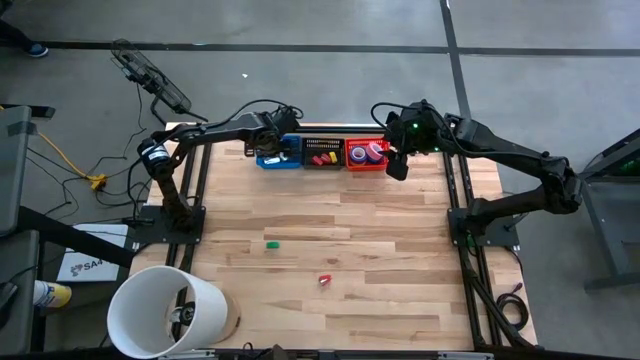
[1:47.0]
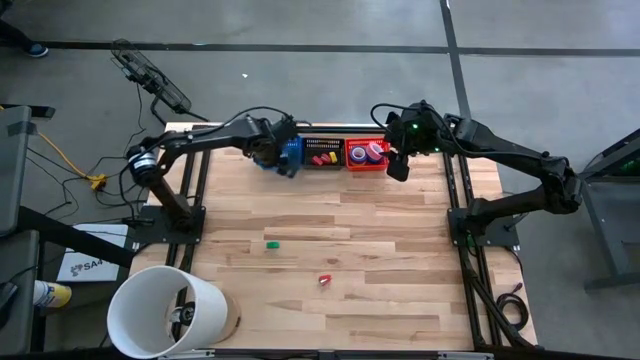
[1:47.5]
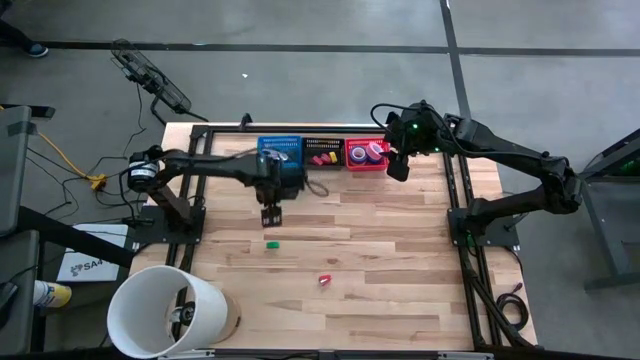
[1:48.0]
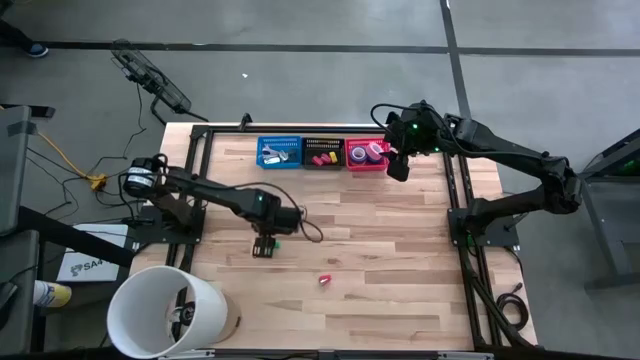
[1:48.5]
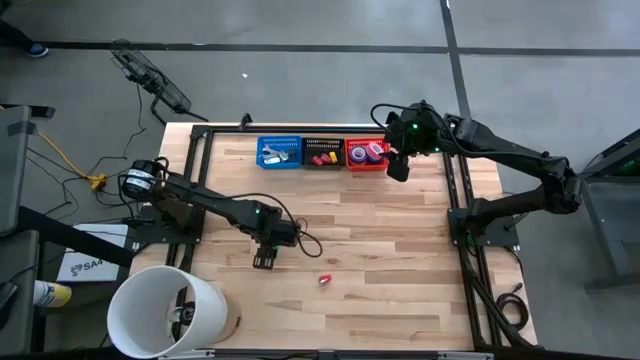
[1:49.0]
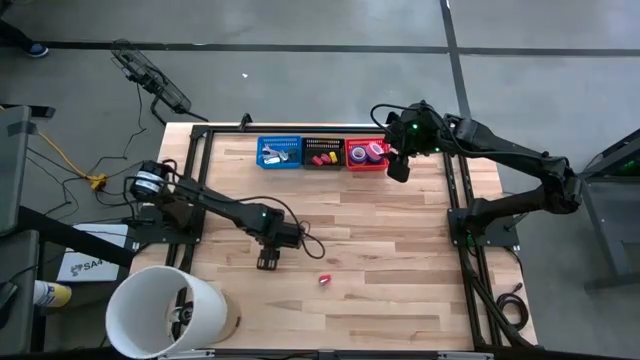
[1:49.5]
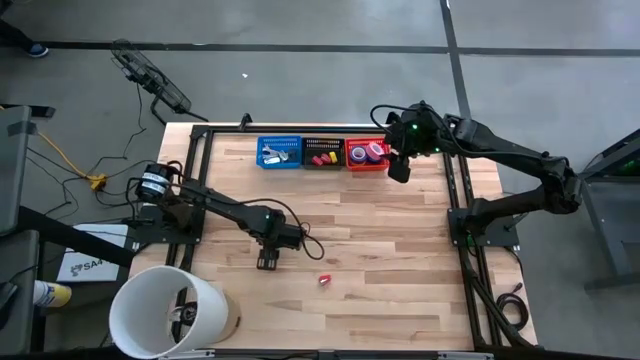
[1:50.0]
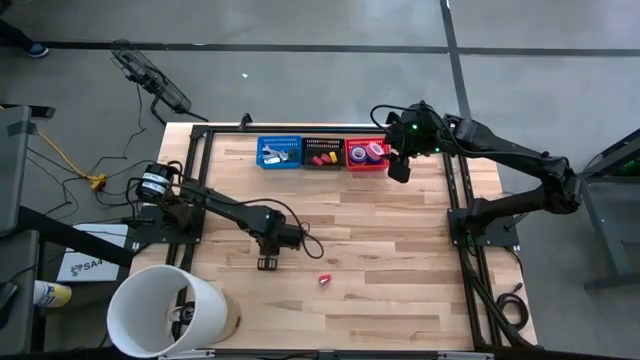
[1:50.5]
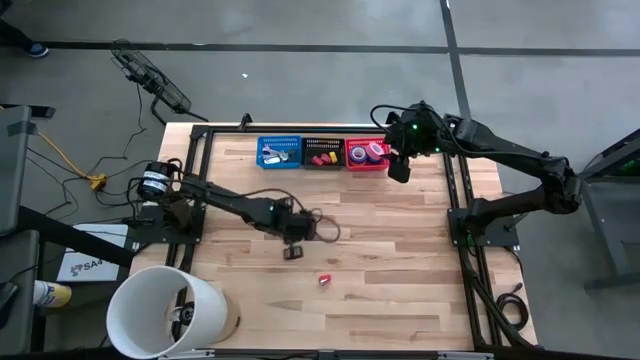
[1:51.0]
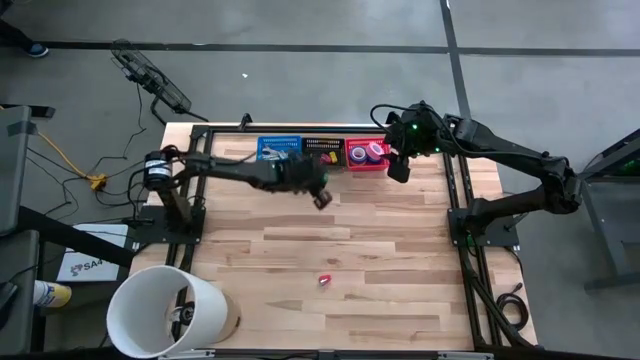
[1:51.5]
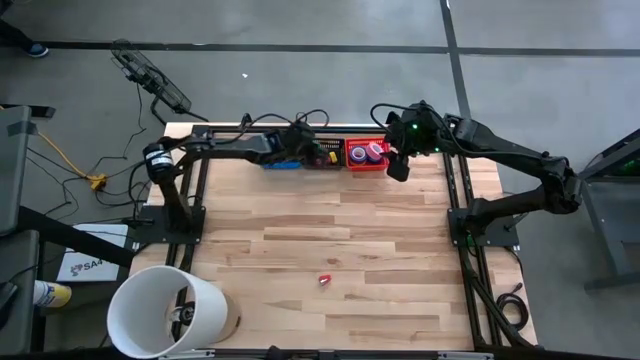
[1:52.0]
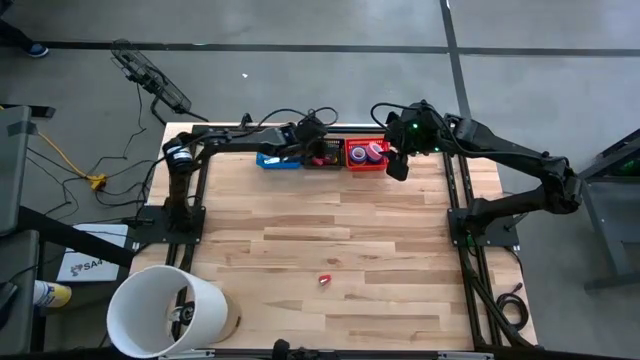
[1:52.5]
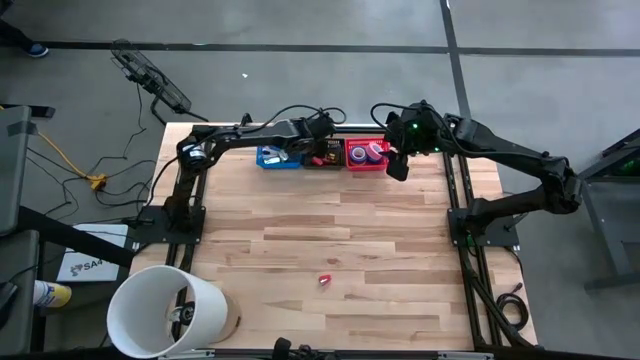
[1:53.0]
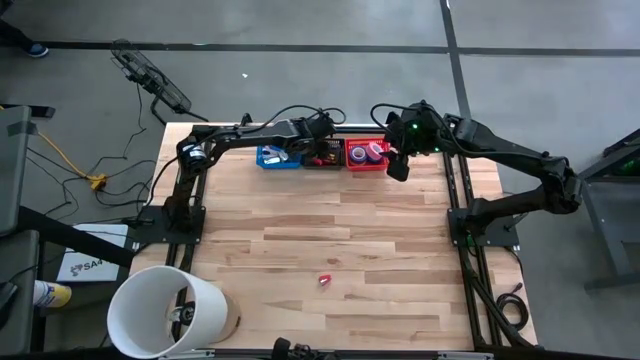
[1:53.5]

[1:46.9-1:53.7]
Task: Pick and place Stapler, Stapler remover, tape
Put the green stapler into the black bin

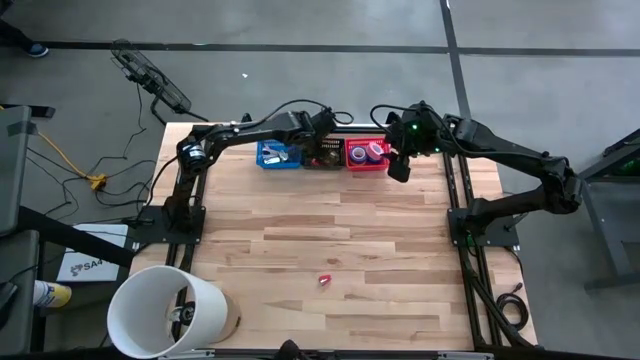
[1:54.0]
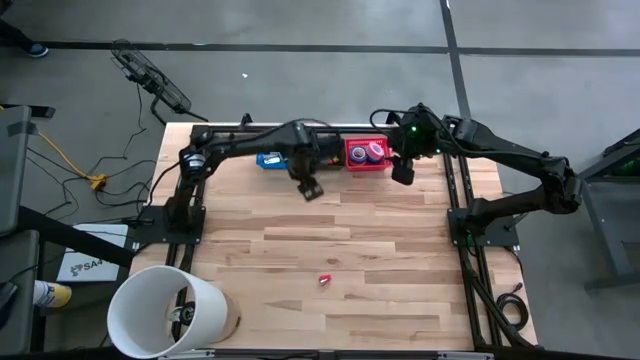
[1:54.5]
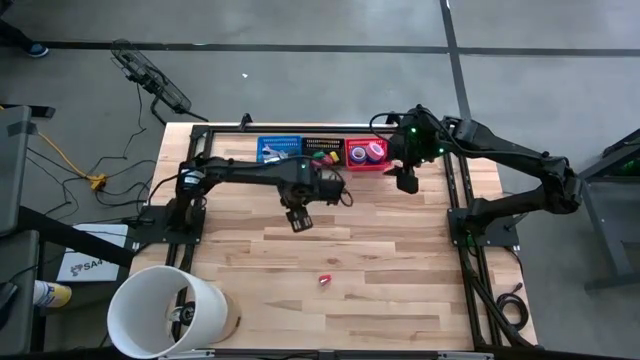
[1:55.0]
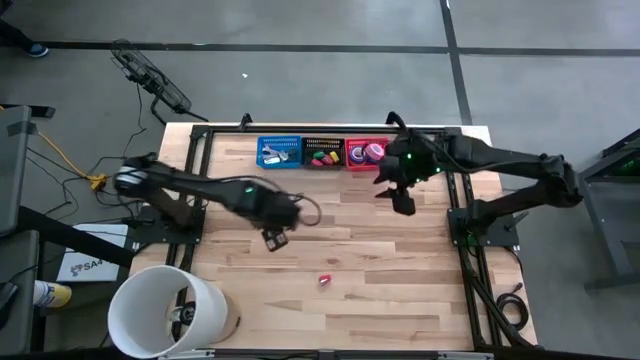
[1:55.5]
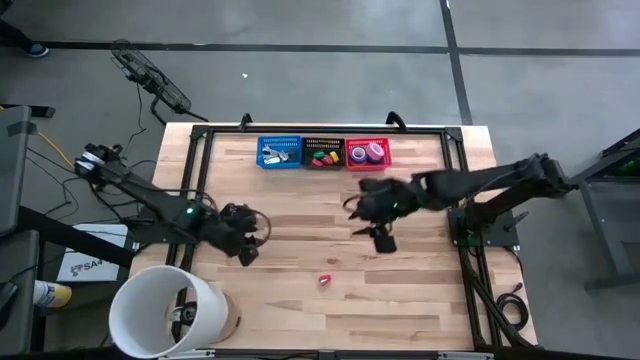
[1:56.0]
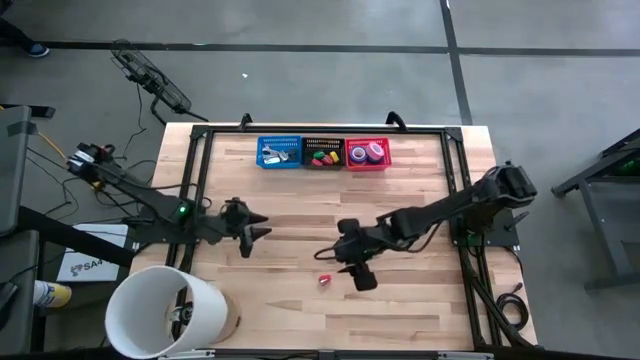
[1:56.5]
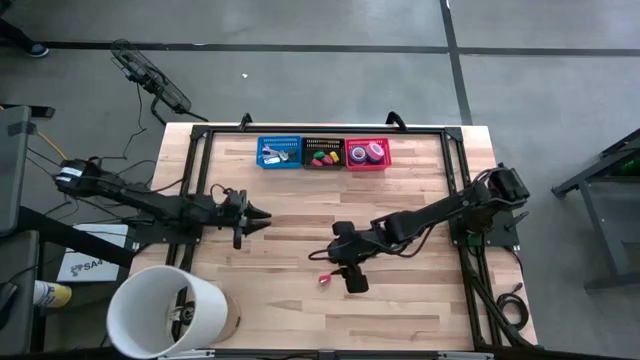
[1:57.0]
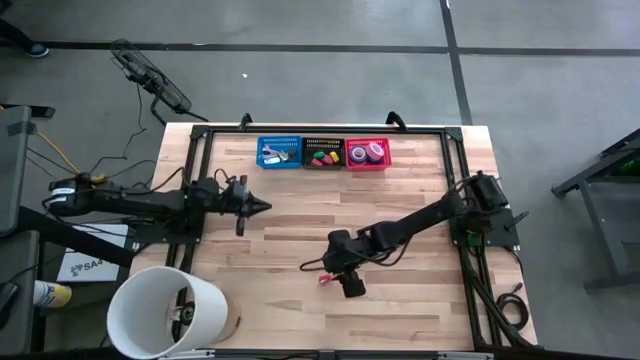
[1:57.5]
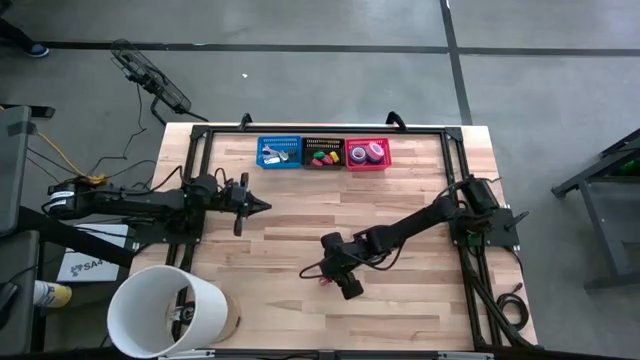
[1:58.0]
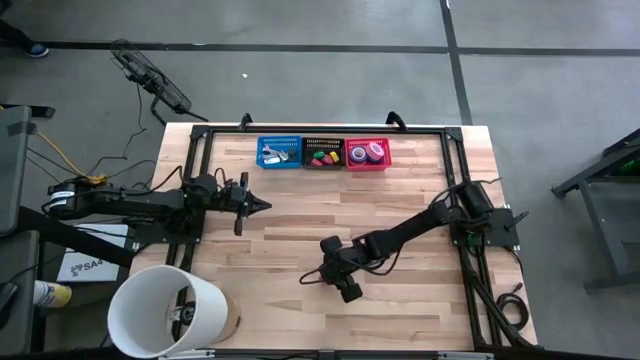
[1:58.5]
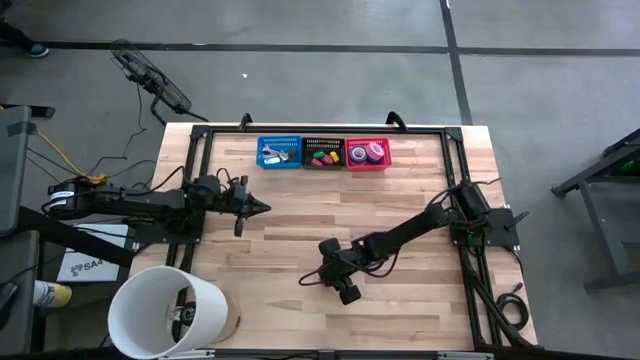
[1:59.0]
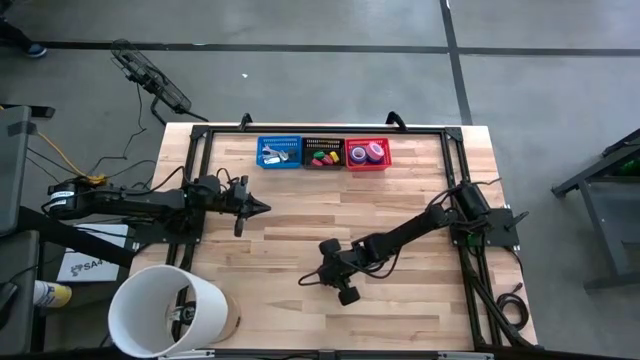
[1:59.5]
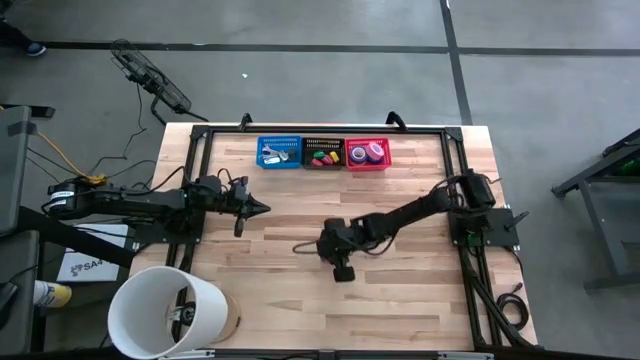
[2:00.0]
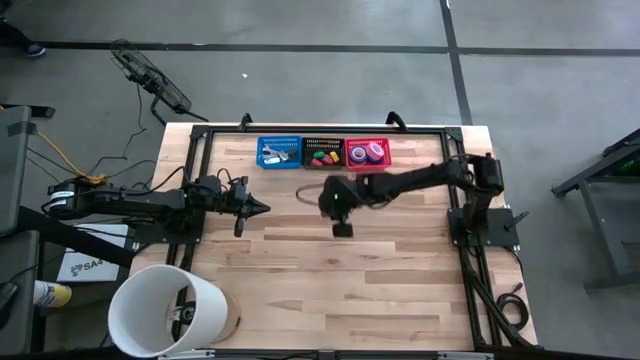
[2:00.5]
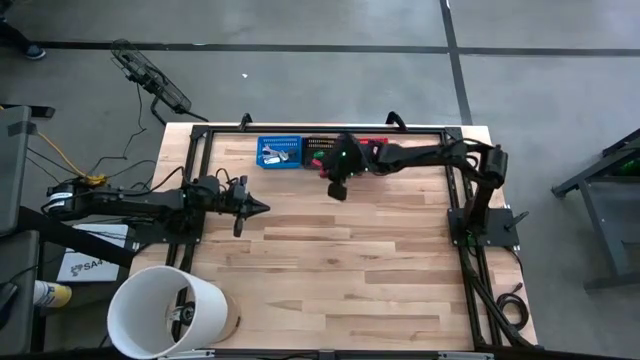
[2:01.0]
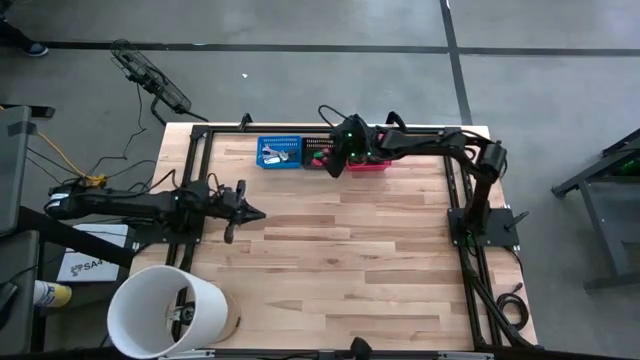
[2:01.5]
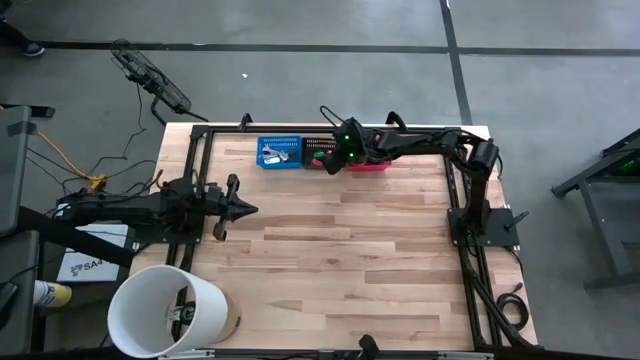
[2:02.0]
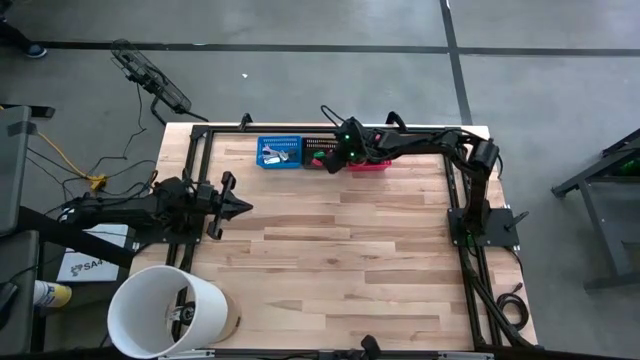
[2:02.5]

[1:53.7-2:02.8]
Put the red stapler into the black bin

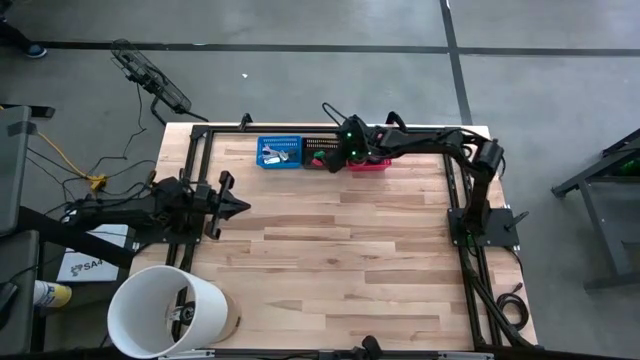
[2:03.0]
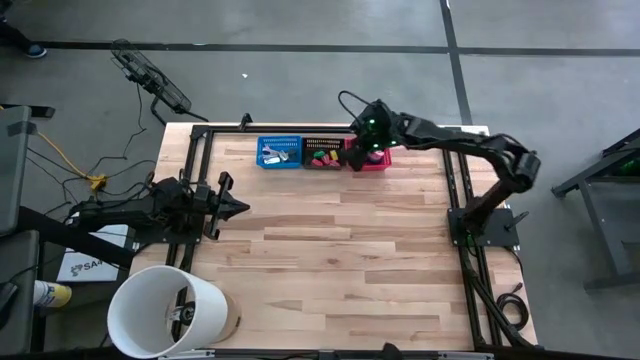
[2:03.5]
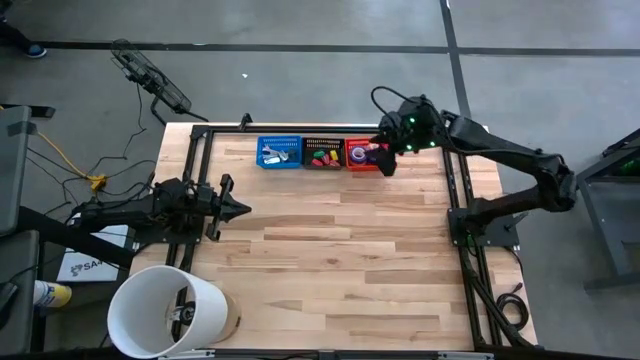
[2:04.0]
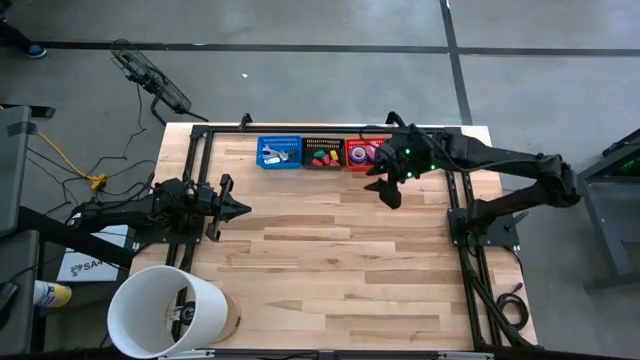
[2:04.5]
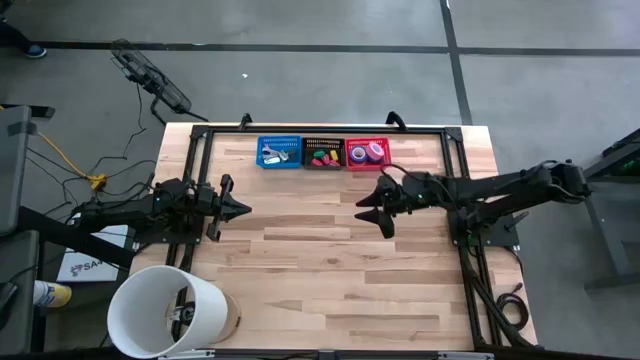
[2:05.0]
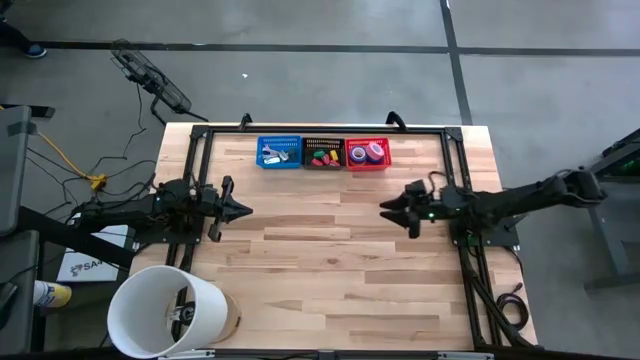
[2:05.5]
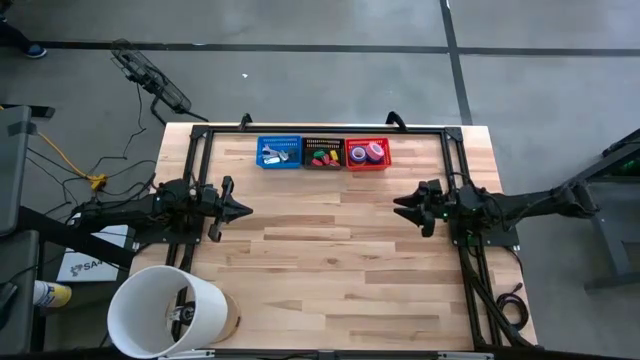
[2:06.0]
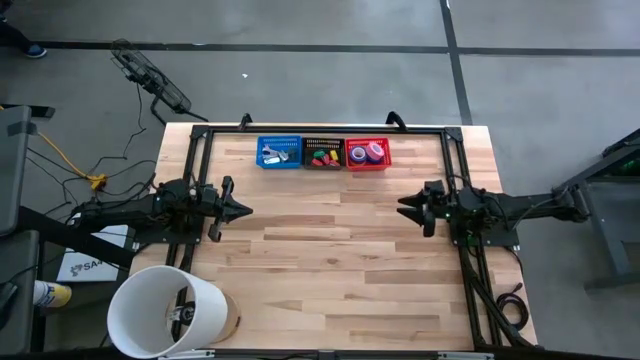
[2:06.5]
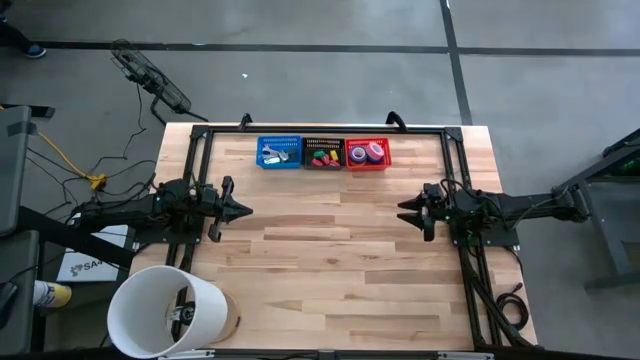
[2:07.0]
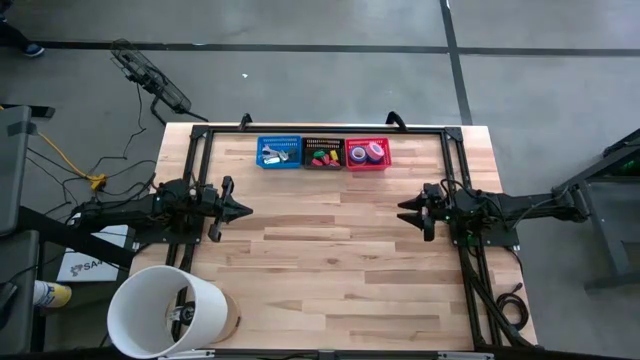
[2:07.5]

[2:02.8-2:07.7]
Return to Home Position

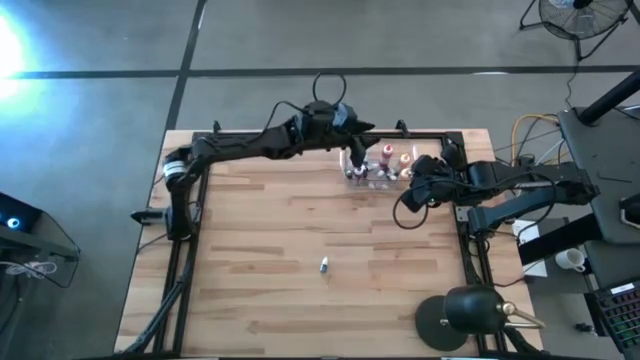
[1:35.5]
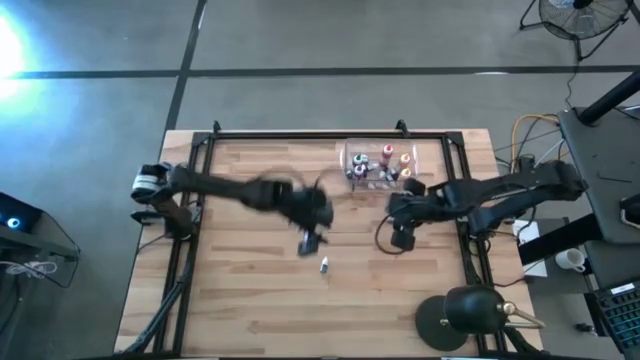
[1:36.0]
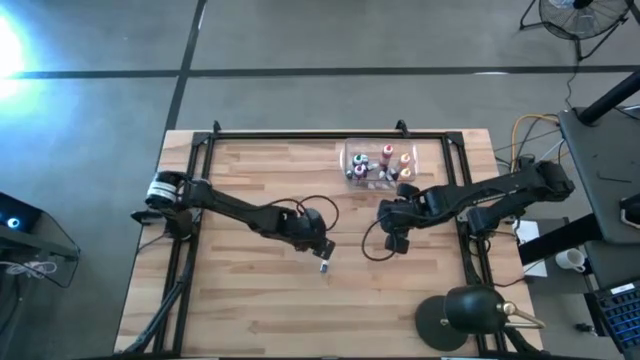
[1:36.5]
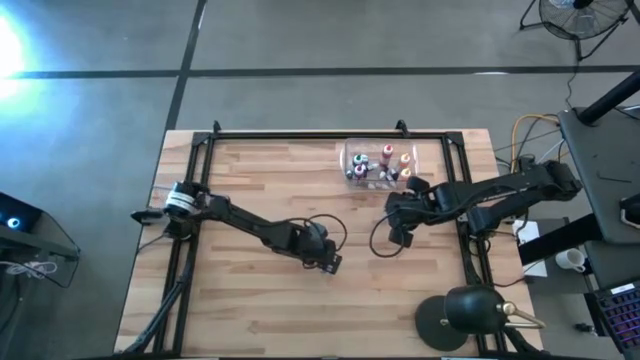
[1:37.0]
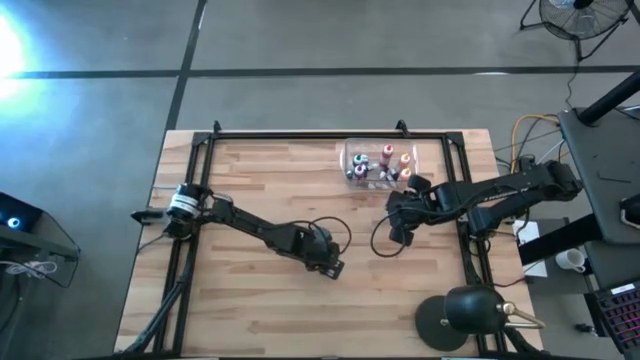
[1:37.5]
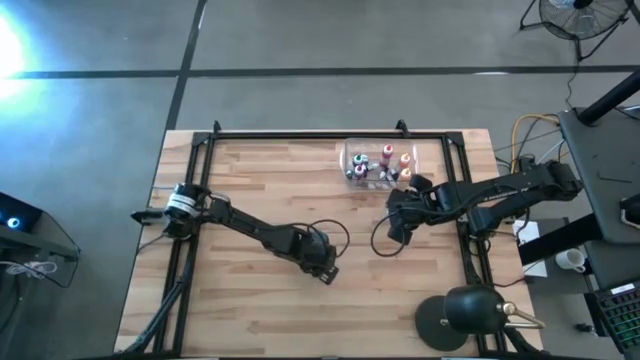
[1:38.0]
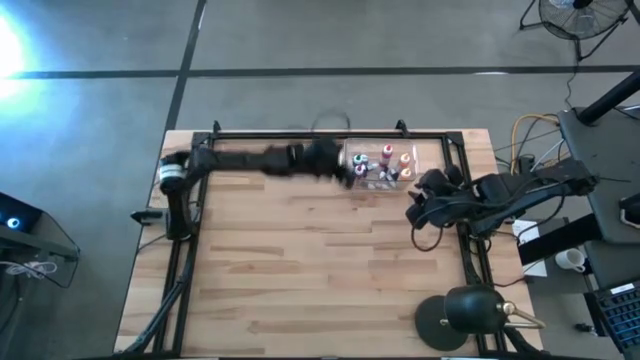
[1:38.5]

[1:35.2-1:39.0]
Task: Pick & Place food coloring
Put the small green food coloring bottle into the transparent bin
